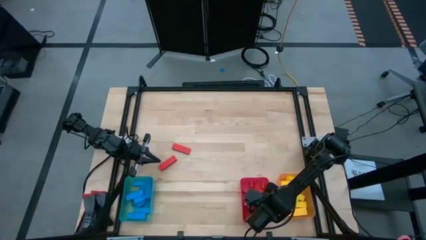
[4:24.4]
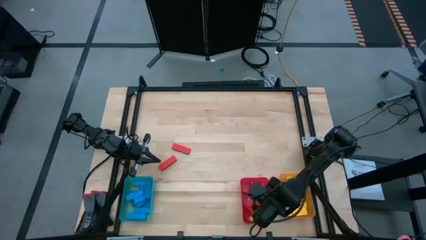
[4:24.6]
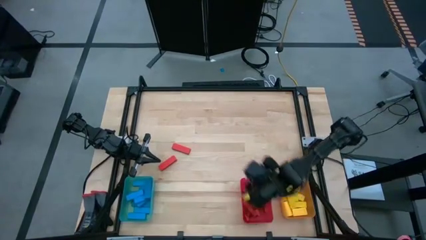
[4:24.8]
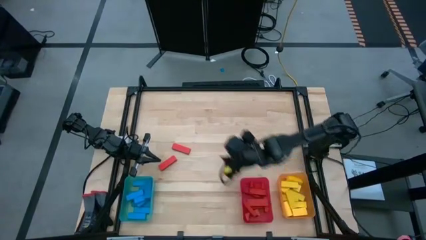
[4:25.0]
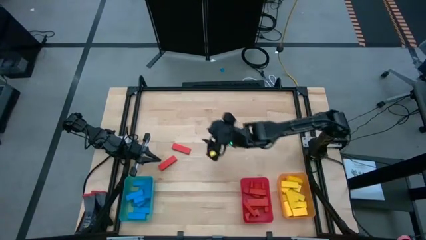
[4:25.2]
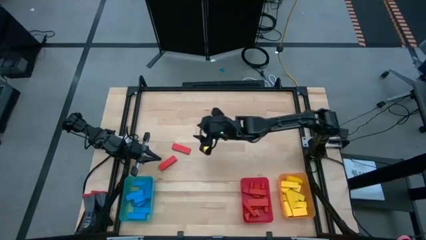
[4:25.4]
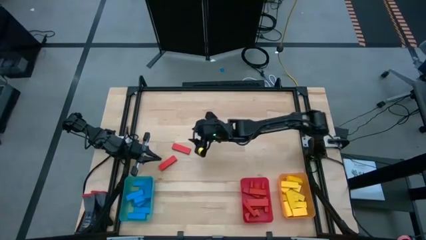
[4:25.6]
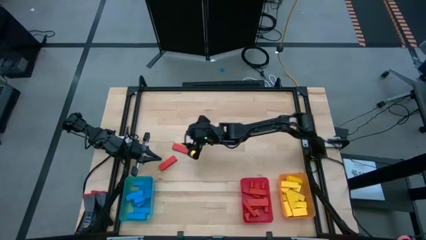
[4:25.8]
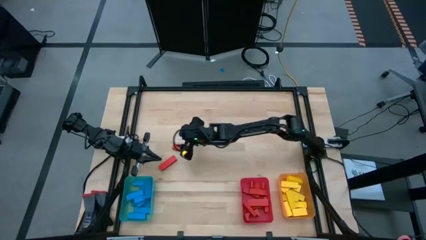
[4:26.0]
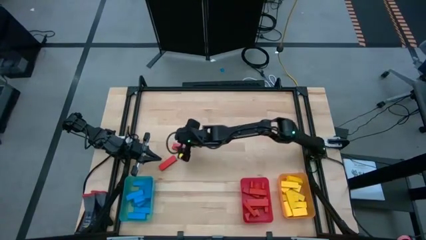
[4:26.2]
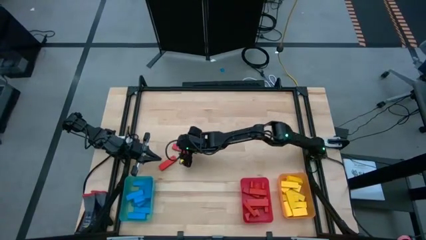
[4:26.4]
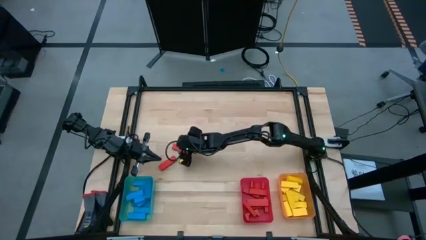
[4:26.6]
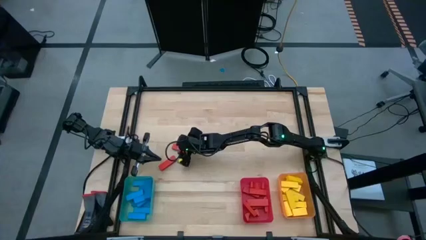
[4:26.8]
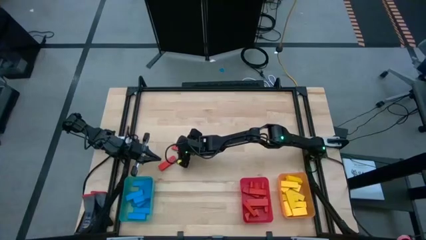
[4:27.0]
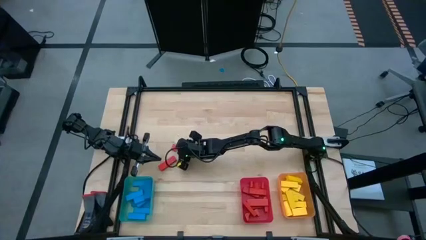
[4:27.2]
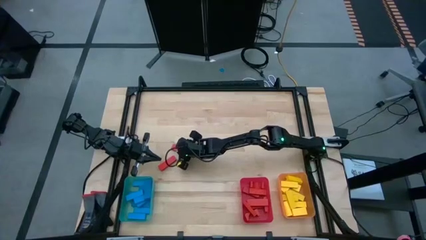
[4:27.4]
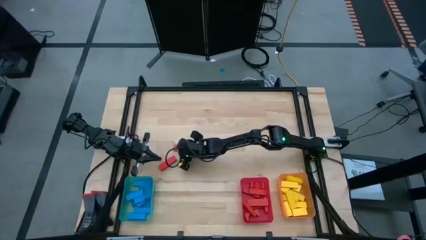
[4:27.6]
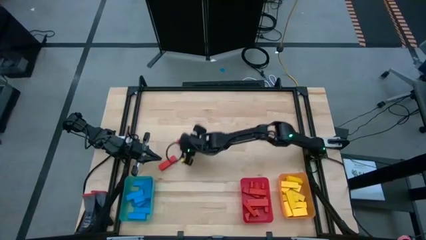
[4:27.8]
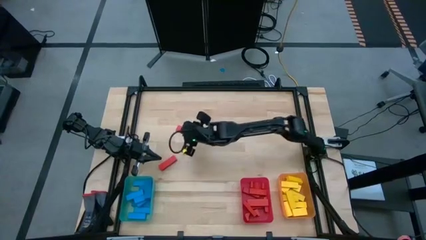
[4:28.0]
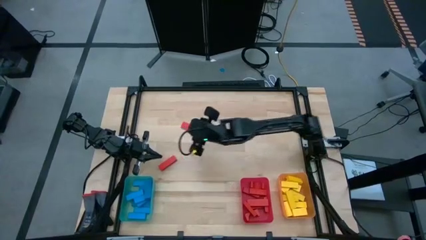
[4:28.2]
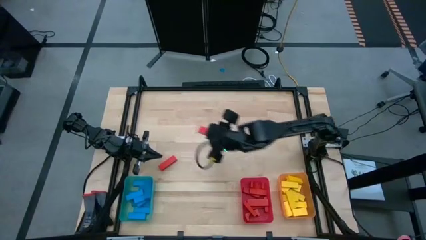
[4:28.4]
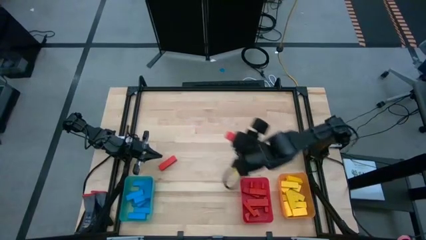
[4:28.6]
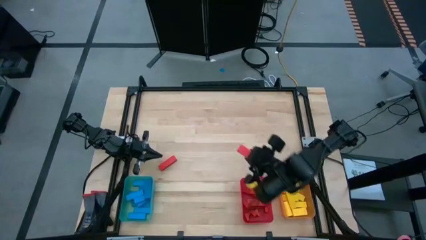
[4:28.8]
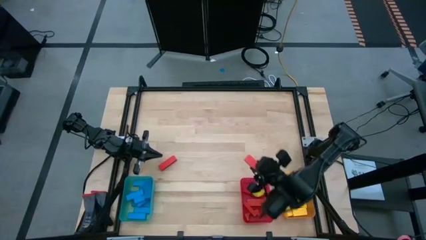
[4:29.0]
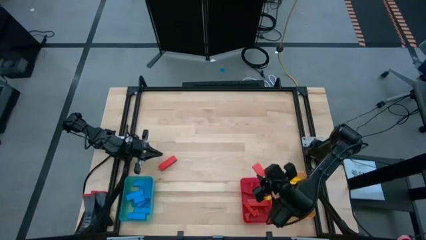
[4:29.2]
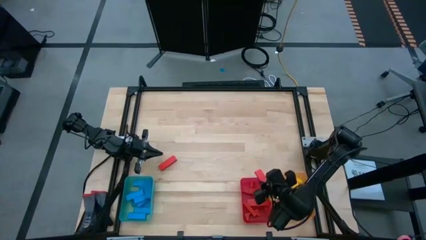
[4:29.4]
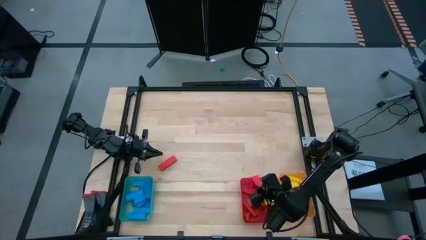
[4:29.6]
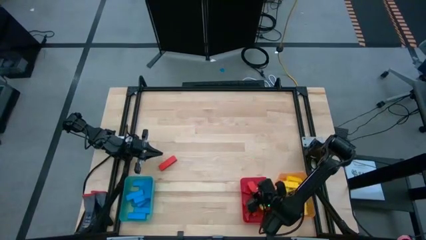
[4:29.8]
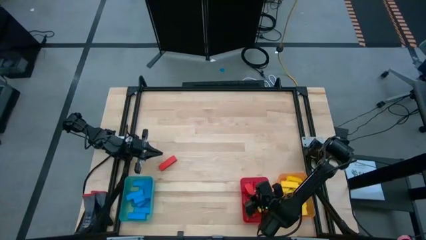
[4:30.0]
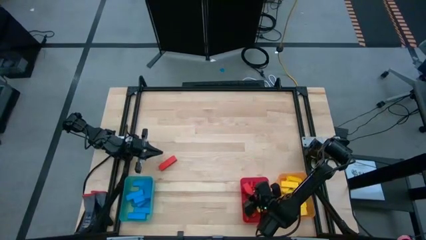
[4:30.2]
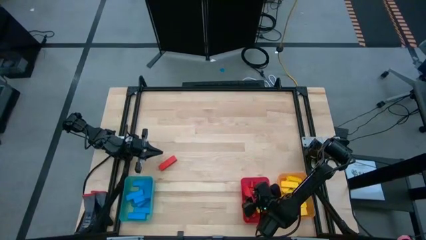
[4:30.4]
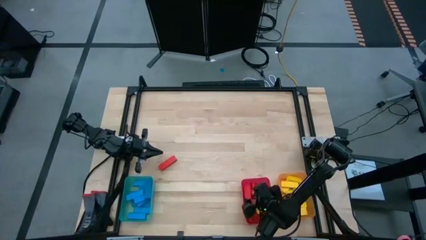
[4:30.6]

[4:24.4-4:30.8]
Task: Sort blocks
Put the red block into the red bin

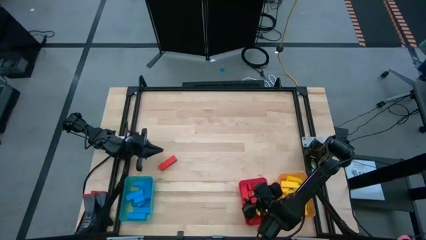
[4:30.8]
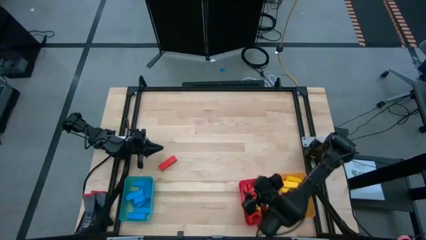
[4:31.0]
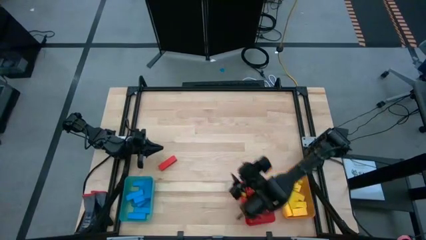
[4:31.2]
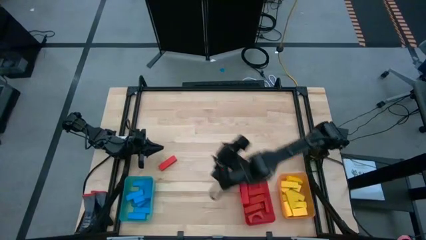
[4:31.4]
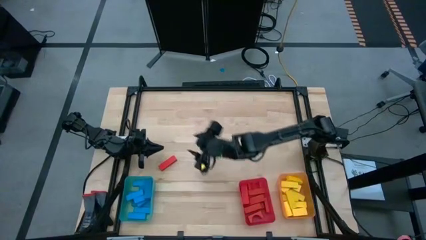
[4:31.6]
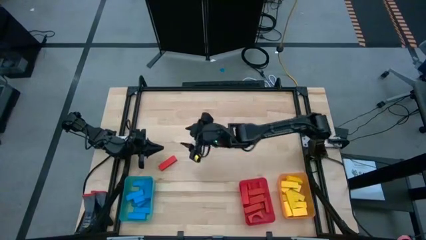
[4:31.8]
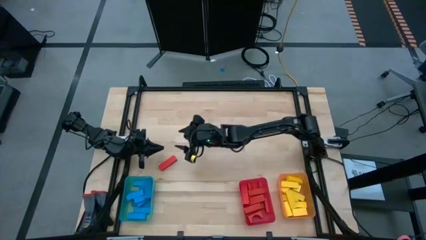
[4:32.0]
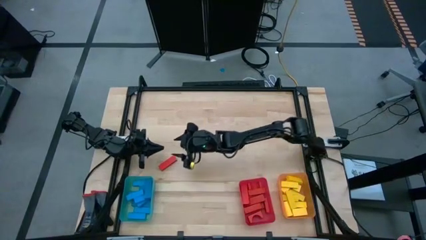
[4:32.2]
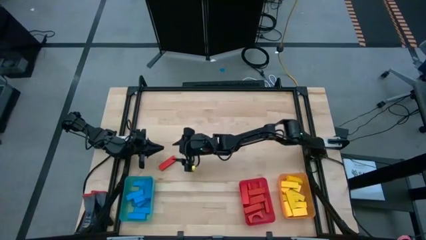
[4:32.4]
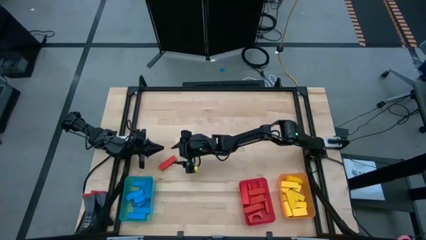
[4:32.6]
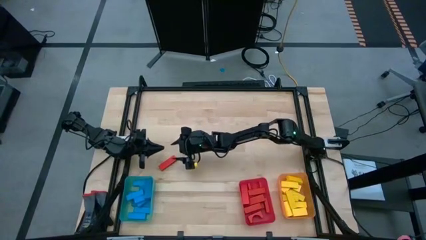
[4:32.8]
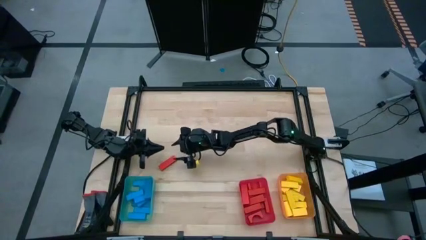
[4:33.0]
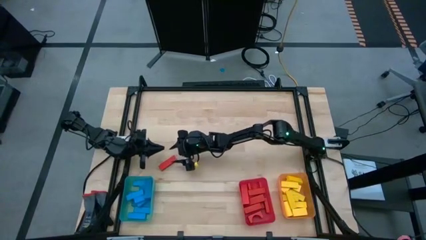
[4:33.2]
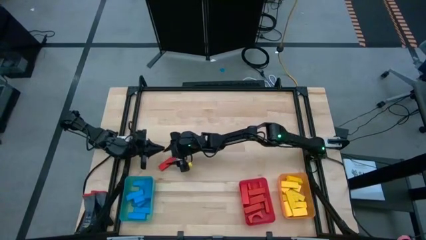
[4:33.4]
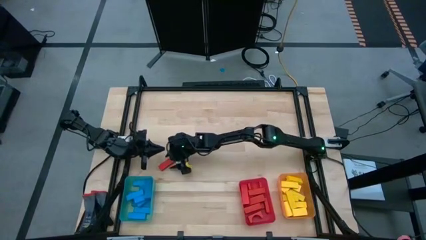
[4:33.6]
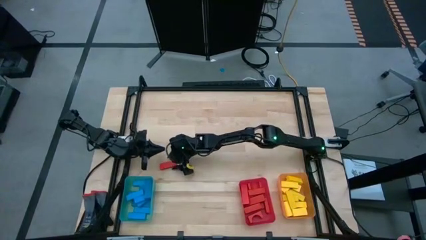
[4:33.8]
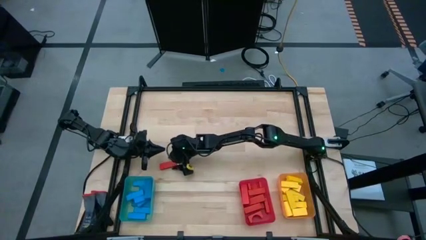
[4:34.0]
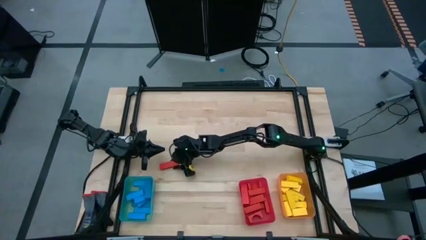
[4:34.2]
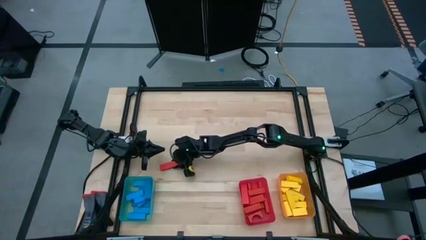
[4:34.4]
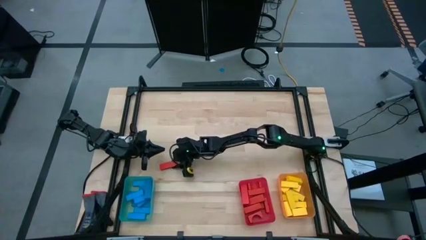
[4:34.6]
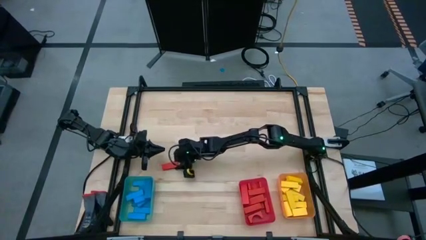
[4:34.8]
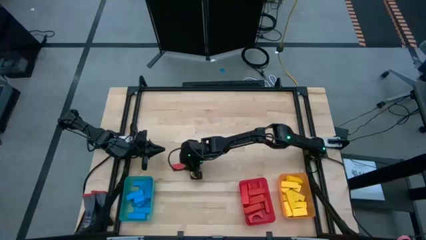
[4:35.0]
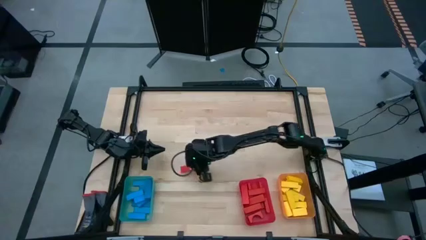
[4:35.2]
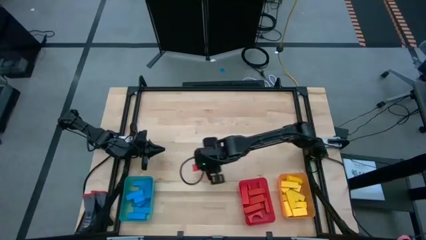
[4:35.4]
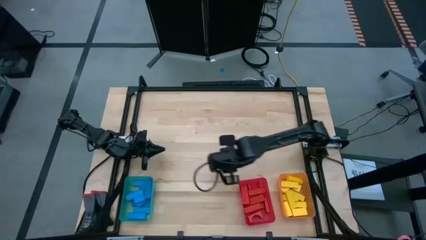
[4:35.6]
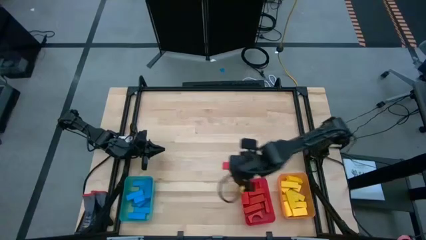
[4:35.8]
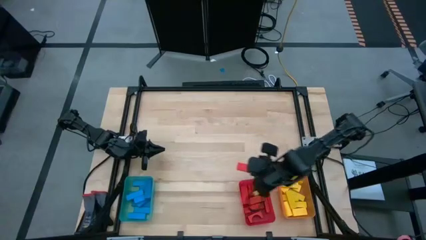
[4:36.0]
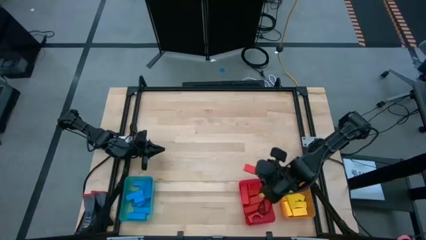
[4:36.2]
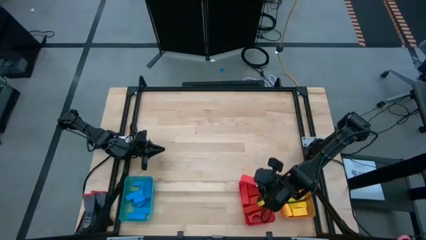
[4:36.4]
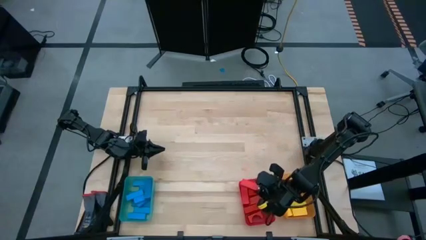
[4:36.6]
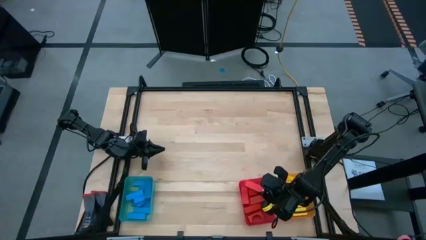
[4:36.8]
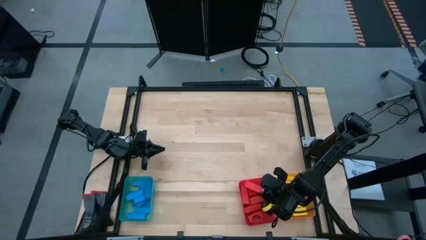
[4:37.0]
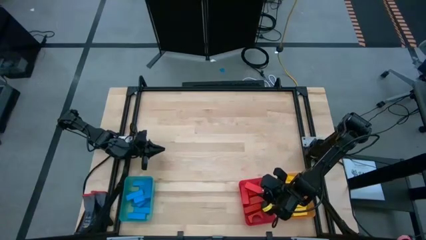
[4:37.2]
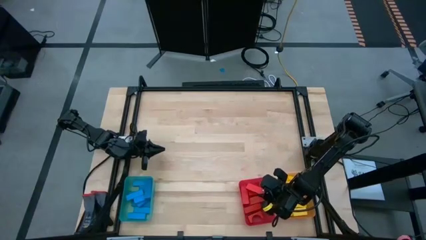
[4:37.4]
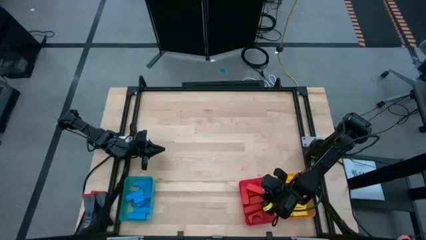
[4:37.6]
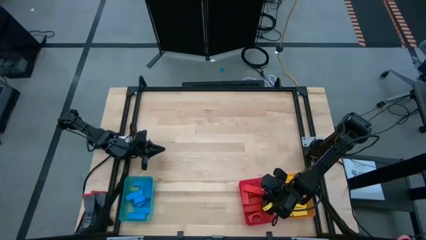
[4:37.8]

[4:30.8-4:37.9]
Put the red block into the red bin
